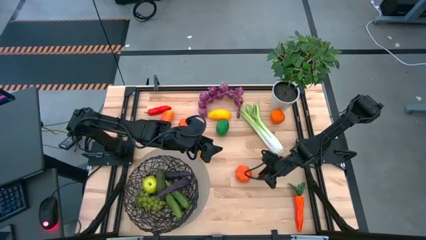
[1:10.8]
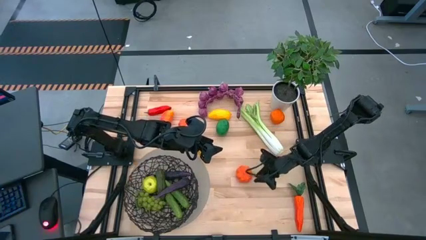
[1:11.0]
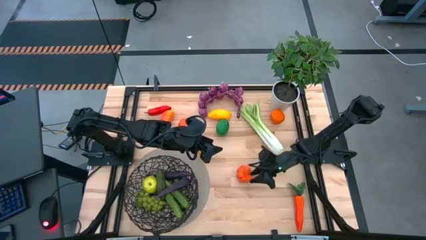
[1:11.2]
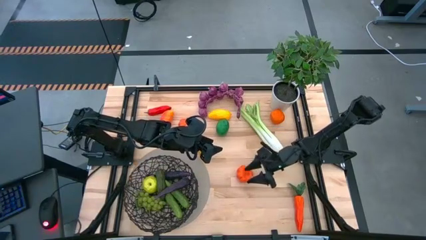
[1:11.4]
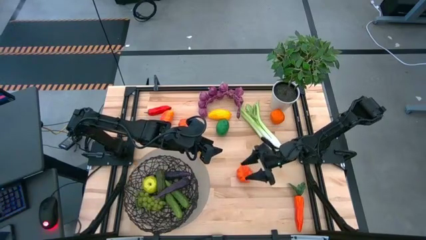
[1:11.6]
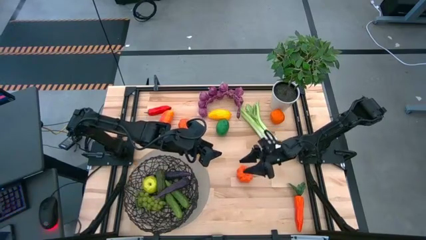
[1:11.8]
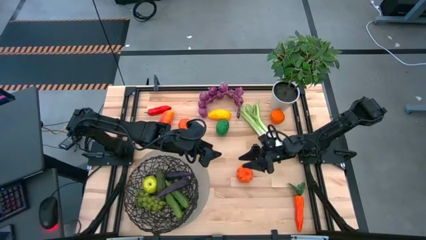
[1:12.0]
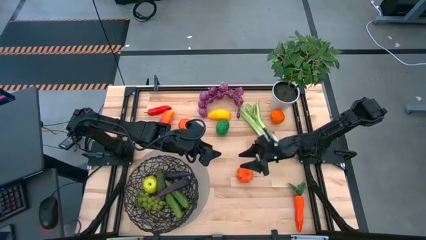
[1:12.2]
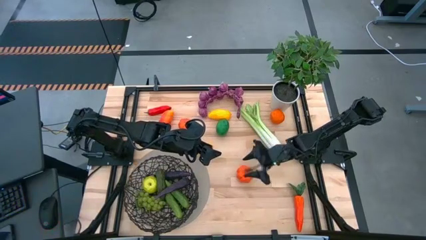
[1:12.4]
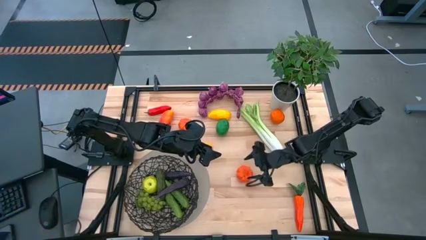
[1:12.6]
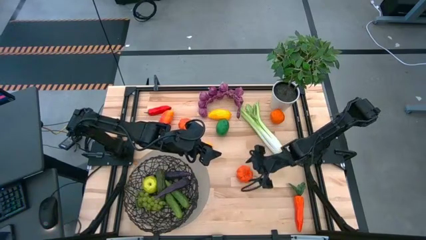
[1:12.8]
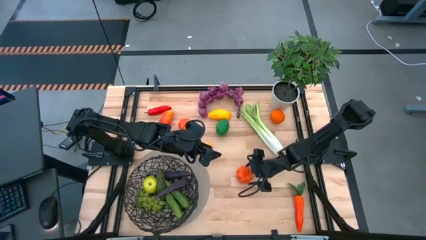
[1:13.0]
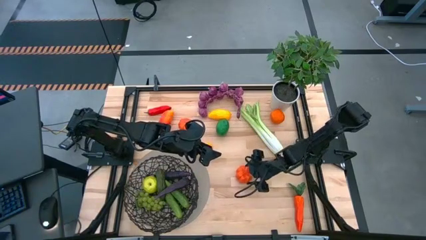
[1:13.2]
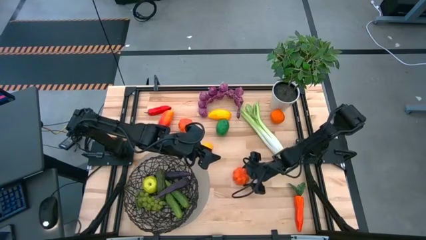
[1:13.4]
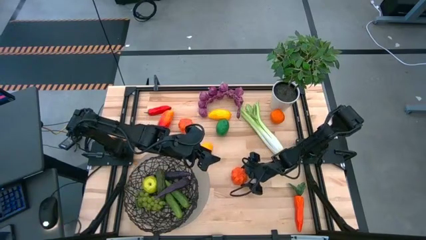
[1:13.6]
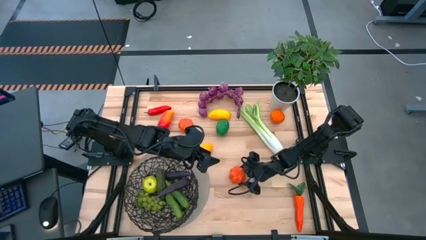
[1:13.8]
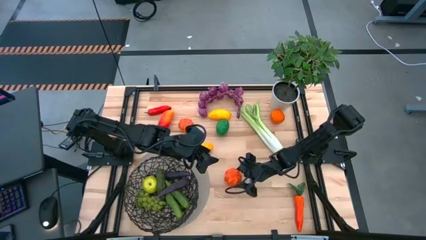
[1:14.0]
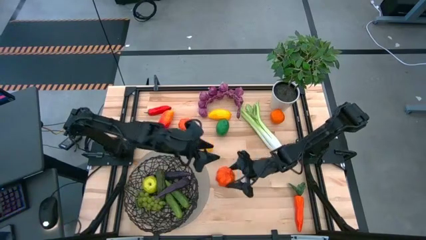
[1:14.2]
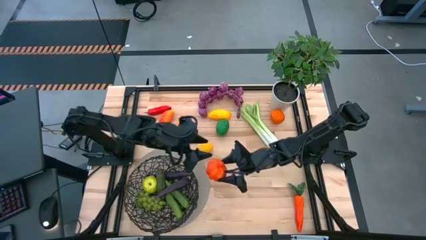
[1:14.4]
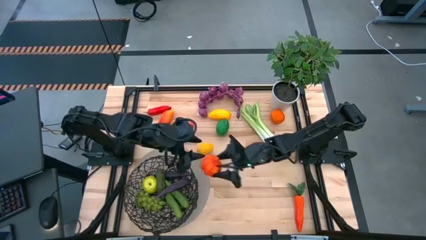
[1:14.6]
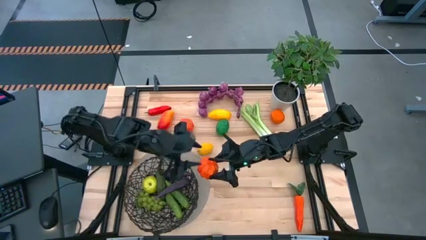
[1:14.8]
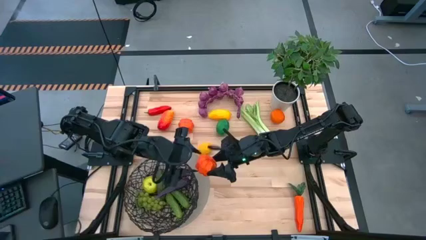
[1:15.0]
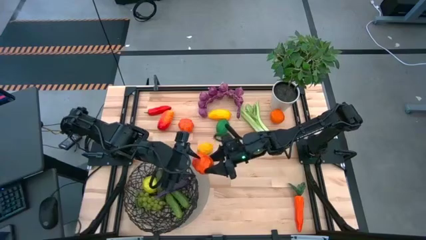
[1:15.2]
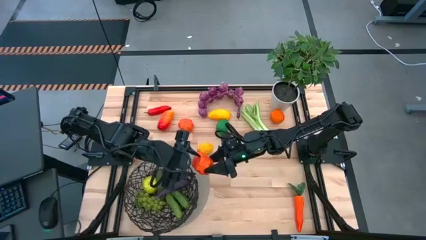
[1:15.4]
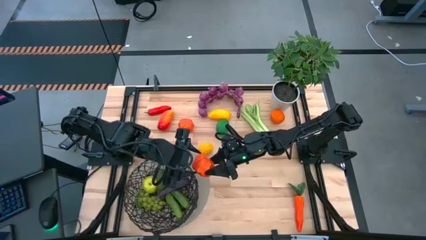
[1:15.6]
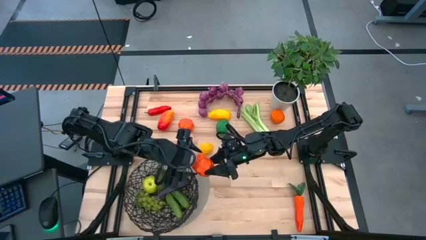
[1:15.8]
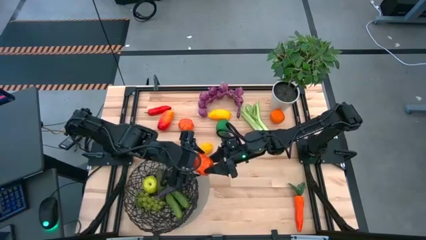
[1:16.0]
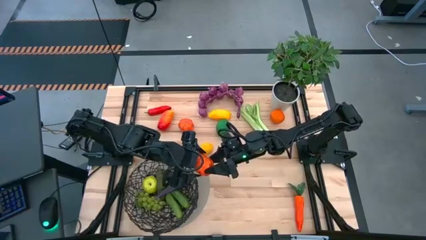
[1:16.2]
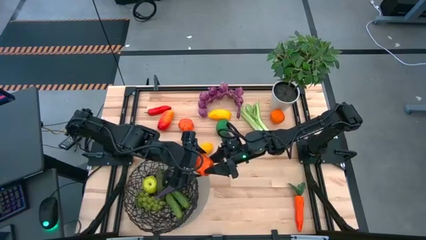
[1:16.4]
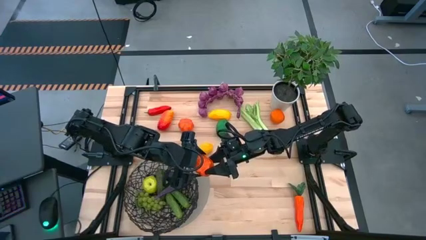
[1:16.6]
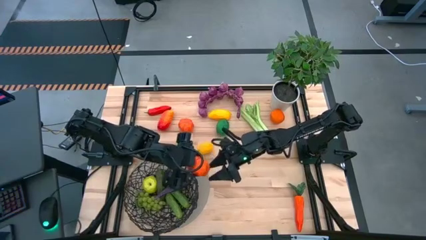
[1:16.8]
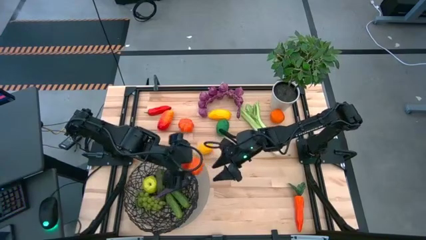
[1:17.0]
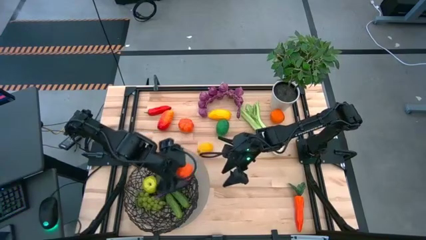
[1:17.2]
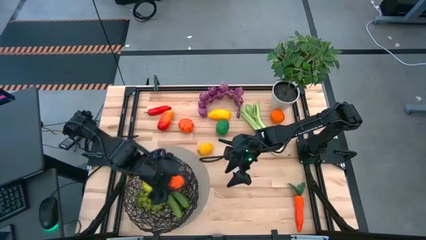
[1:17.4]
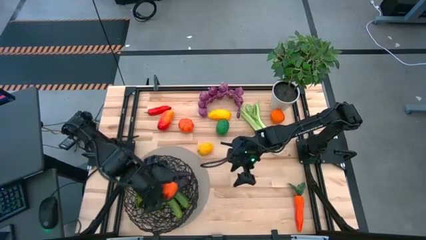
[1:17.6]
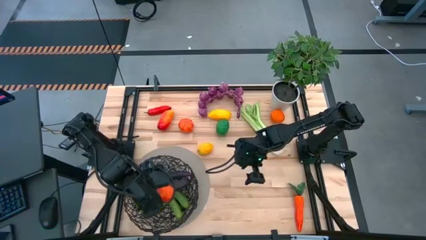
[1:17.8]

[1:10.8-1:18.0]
Task: Build produce basket
Put the bottom orange pumpkin into the black basket

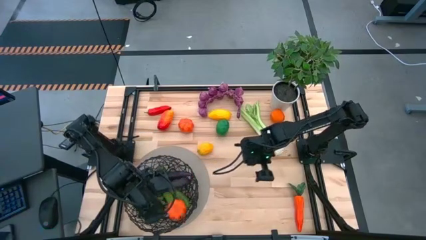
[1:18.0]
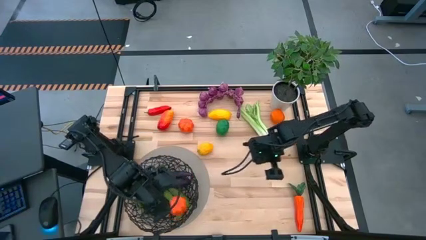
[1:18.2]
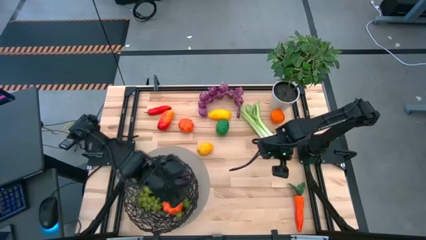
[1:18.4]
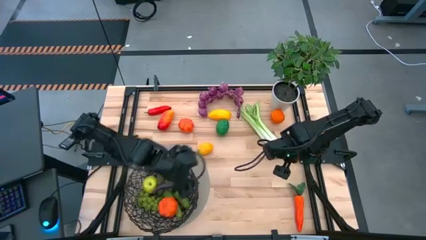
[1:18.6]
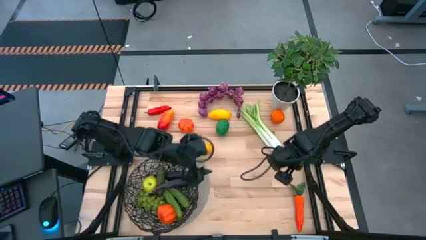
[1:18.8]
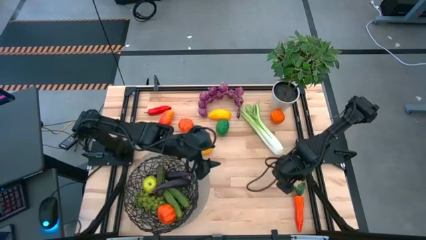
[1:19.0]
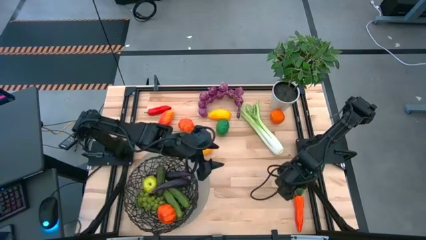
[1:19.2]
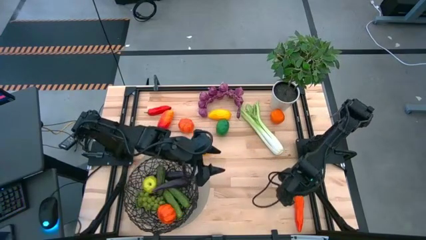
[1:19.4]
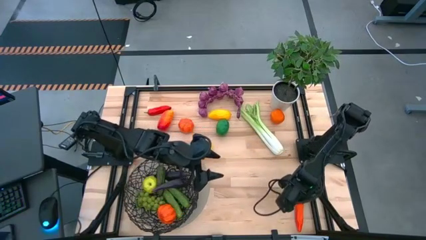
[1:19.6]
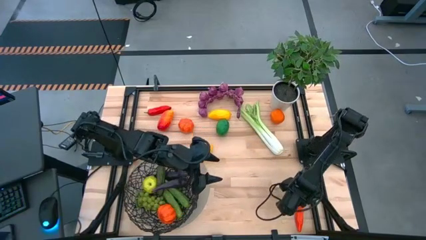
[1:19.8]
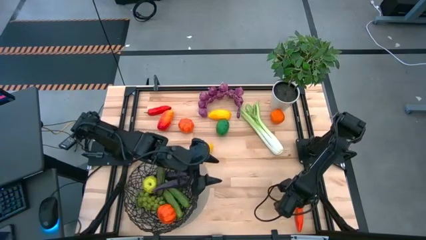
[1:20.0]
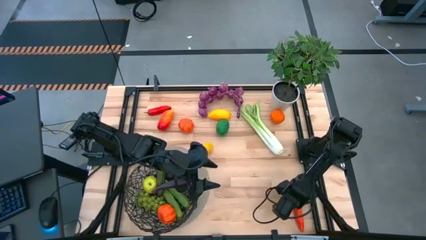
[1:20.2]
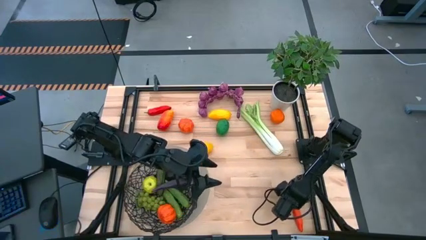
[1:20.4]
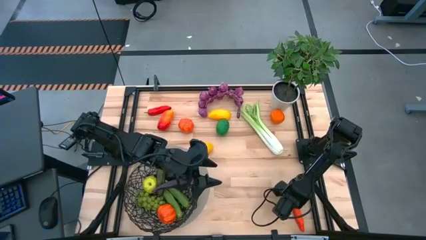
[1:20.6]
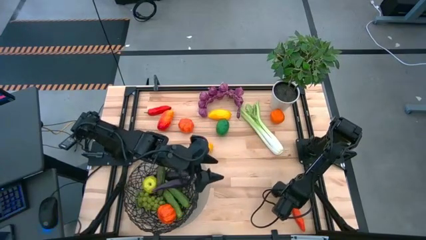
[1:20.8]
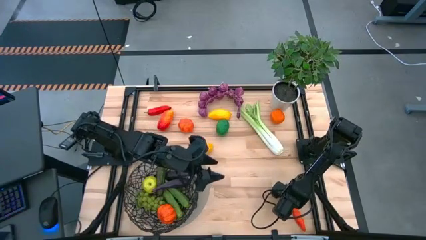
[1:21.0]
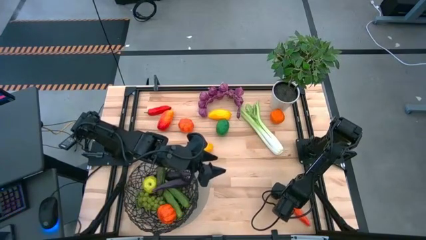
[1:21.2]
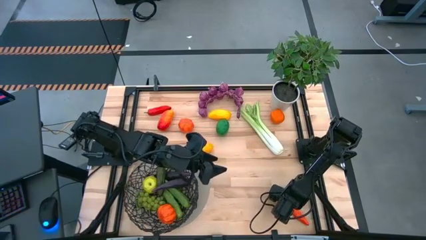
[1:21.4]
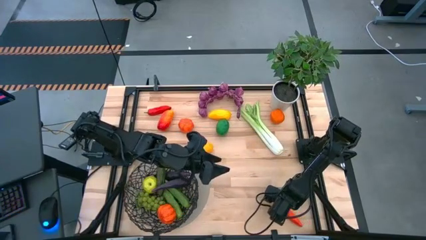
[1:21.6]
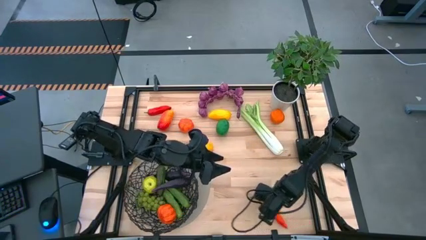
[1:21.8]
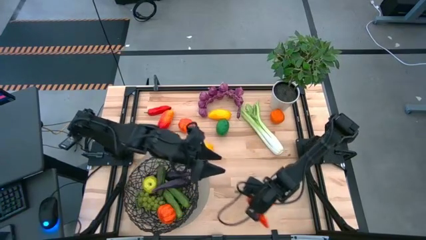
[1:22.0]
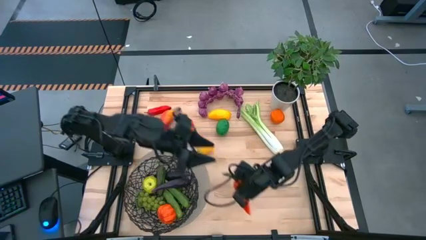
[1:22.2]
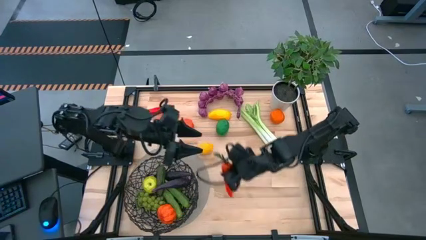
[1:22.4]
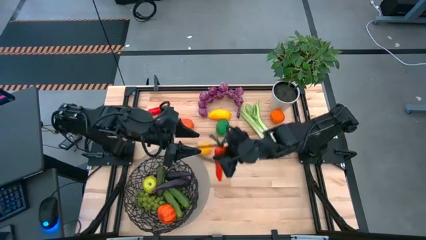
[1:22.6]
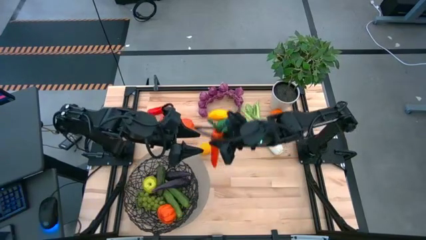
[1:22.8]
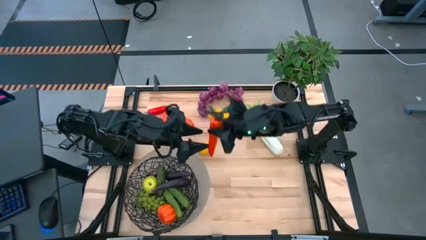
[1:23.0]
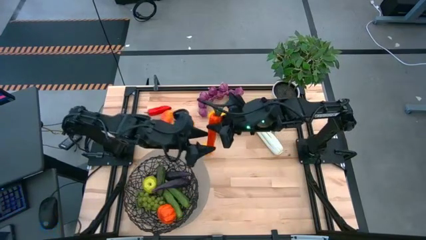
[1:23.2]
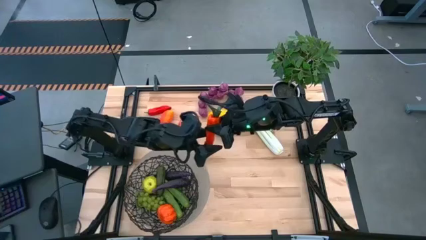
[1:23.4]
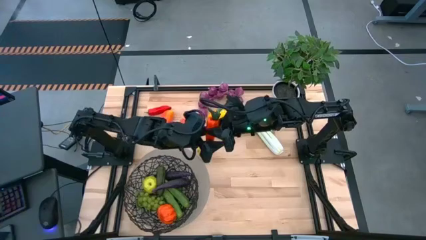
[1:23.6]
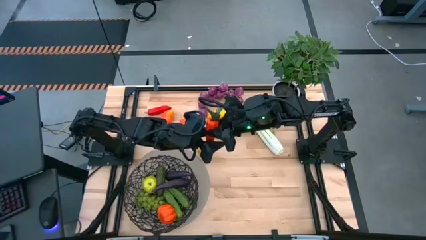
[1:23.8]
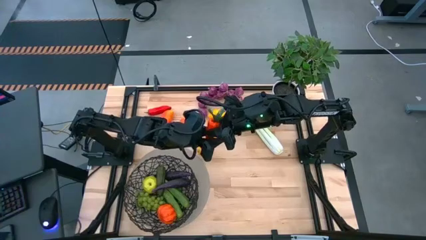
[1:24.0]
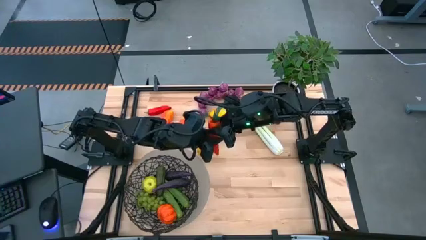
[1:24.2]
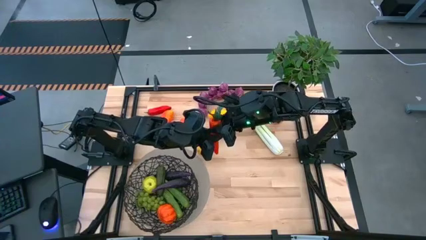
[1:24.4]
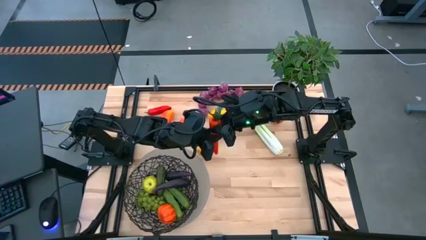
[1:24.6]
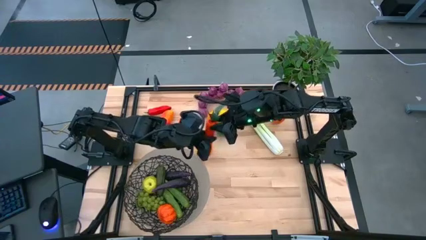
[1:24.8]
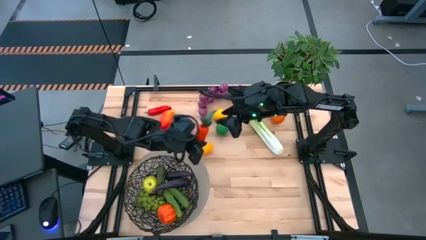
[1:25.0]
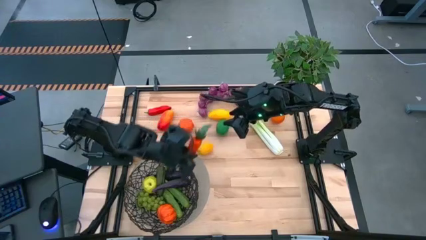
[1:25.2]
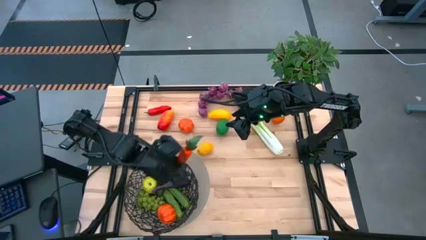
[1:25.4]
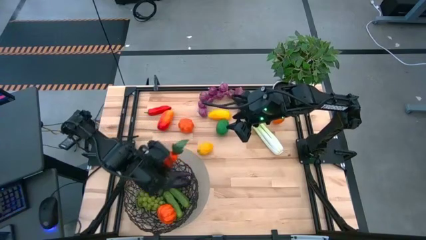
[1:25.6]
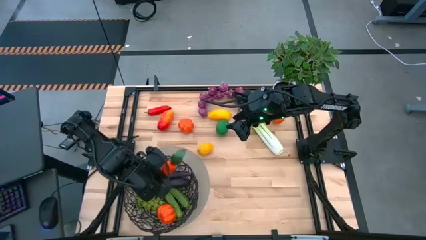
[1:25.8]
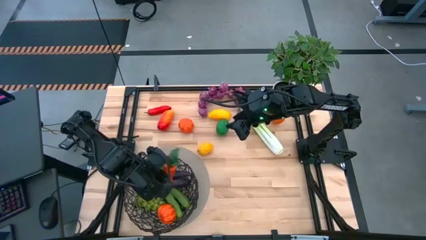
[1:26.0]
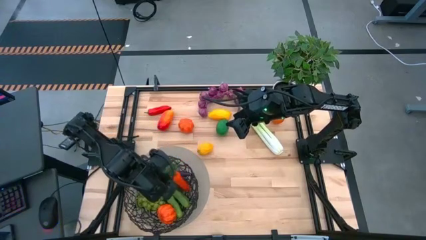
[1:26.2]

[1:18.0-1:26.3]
Put the orange carrot into the black basket
